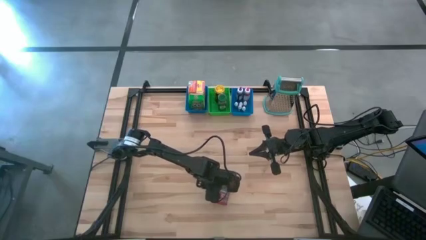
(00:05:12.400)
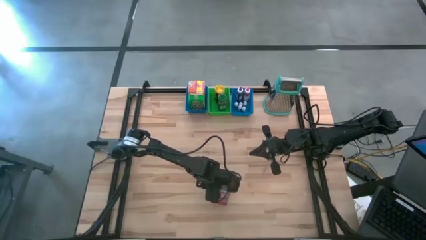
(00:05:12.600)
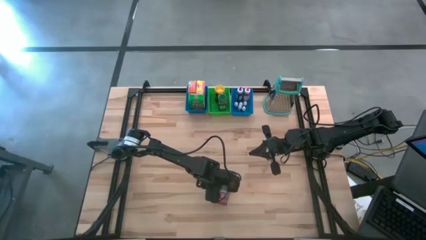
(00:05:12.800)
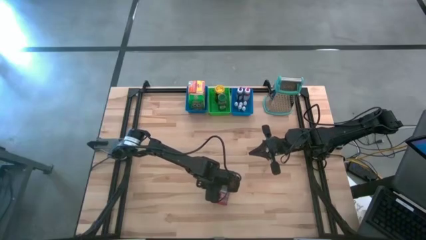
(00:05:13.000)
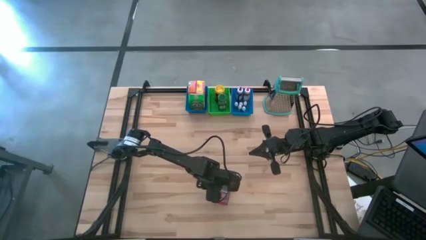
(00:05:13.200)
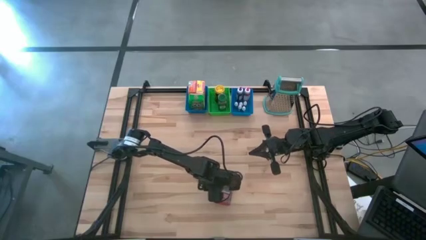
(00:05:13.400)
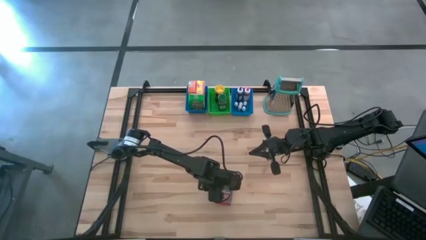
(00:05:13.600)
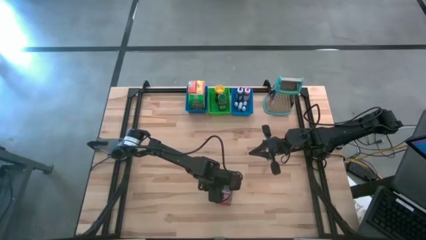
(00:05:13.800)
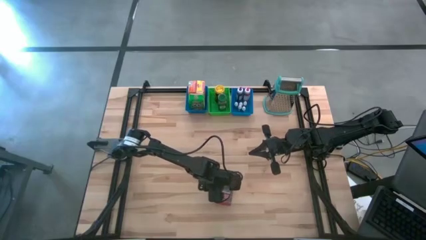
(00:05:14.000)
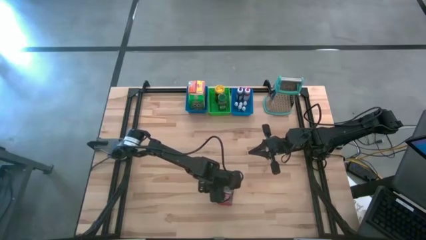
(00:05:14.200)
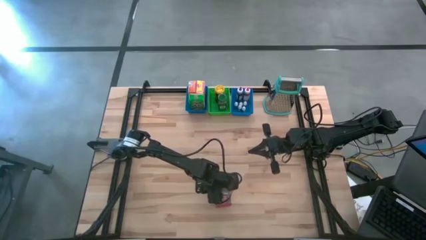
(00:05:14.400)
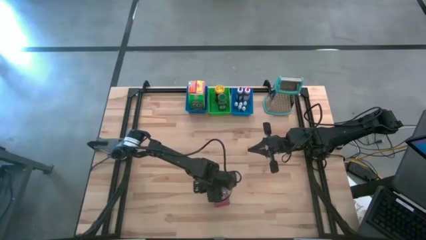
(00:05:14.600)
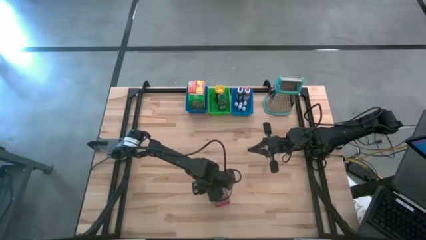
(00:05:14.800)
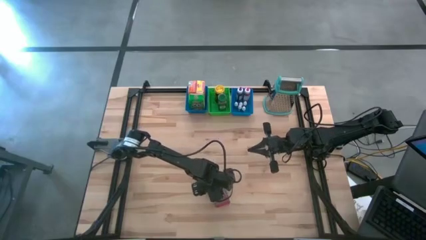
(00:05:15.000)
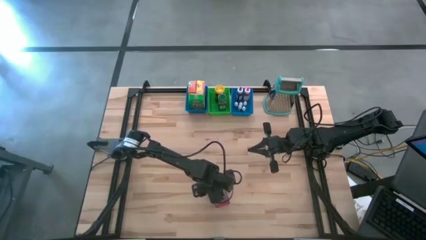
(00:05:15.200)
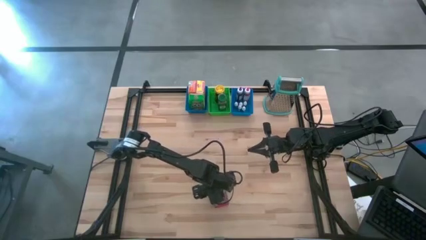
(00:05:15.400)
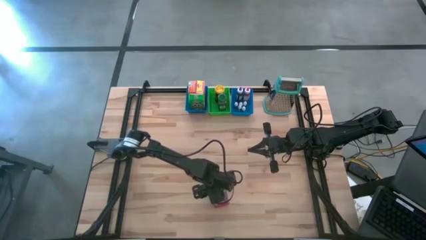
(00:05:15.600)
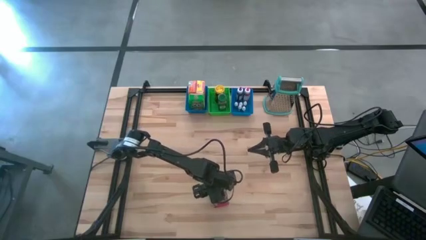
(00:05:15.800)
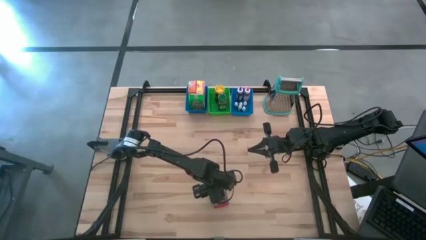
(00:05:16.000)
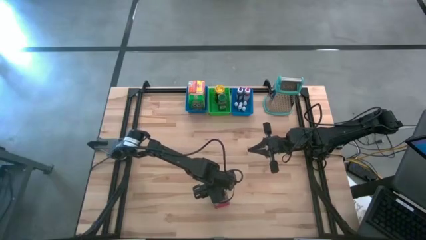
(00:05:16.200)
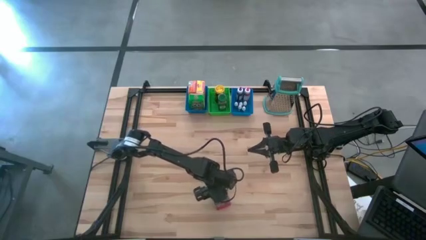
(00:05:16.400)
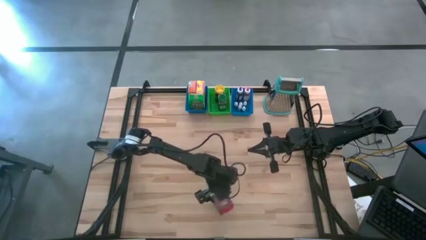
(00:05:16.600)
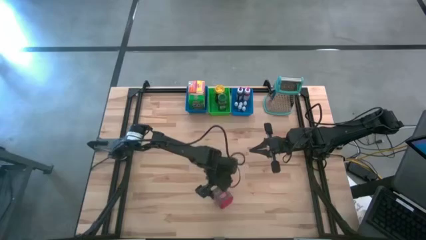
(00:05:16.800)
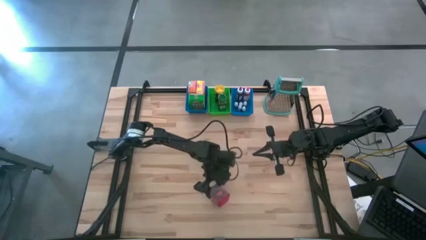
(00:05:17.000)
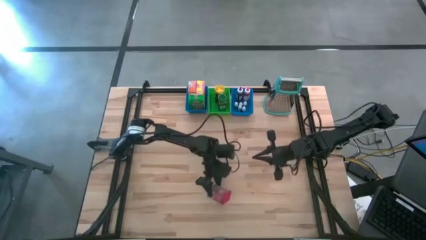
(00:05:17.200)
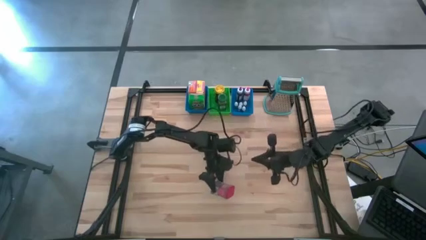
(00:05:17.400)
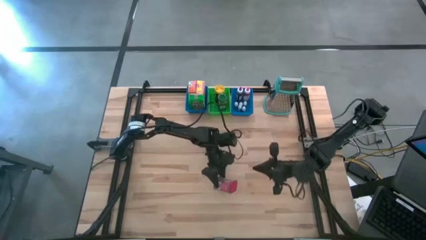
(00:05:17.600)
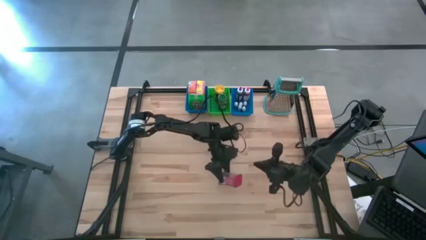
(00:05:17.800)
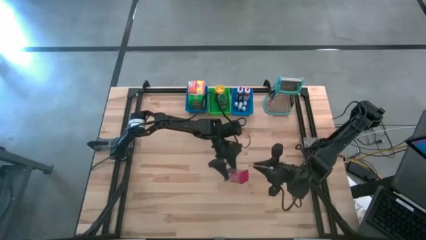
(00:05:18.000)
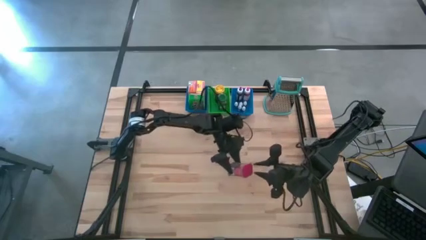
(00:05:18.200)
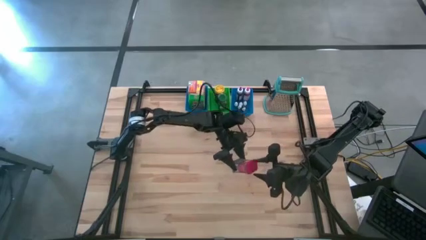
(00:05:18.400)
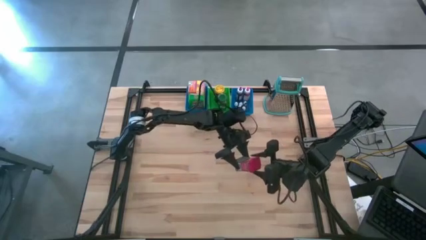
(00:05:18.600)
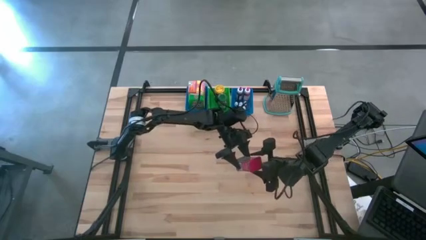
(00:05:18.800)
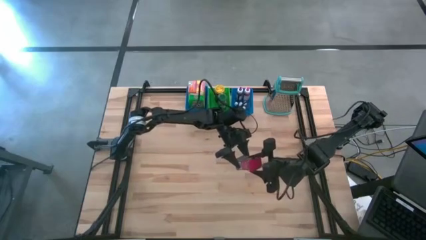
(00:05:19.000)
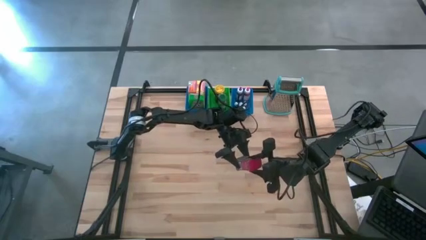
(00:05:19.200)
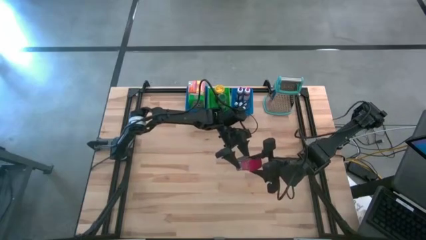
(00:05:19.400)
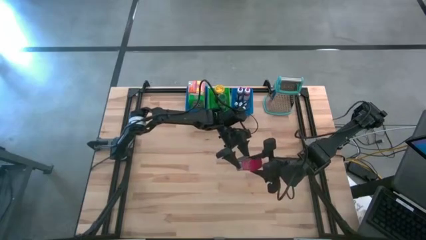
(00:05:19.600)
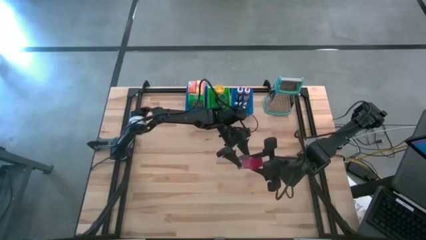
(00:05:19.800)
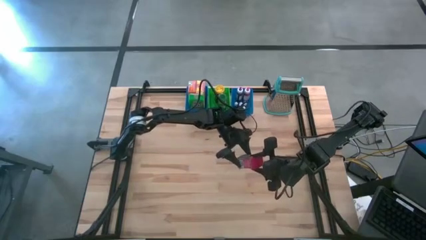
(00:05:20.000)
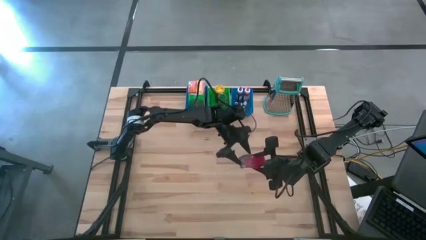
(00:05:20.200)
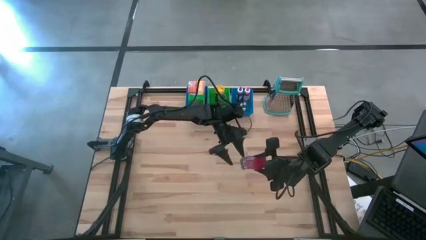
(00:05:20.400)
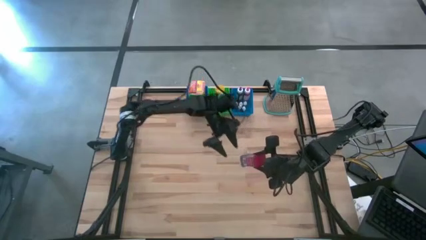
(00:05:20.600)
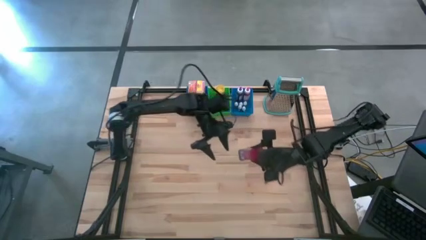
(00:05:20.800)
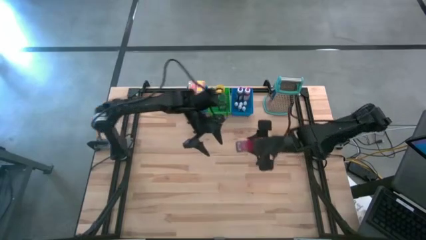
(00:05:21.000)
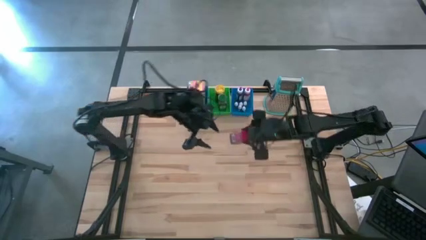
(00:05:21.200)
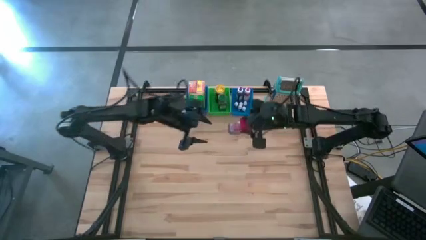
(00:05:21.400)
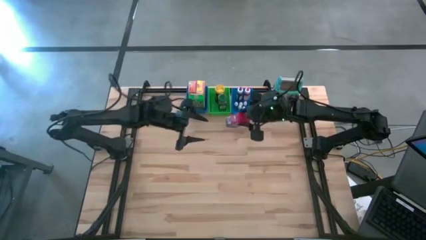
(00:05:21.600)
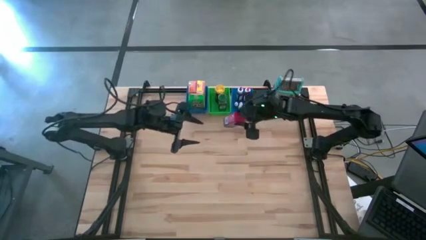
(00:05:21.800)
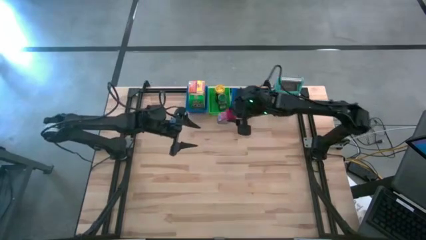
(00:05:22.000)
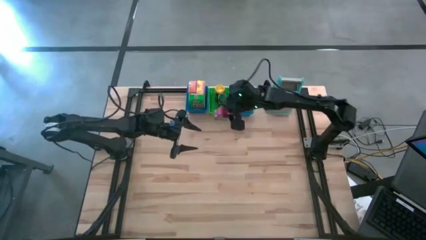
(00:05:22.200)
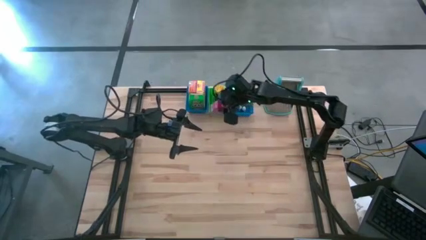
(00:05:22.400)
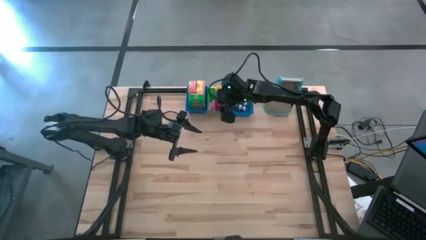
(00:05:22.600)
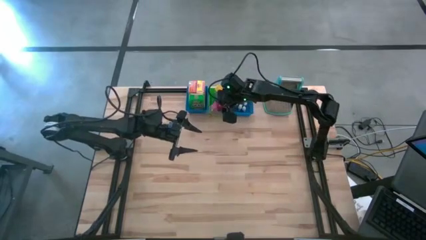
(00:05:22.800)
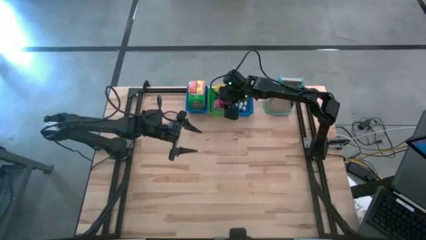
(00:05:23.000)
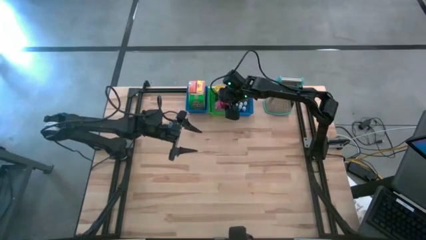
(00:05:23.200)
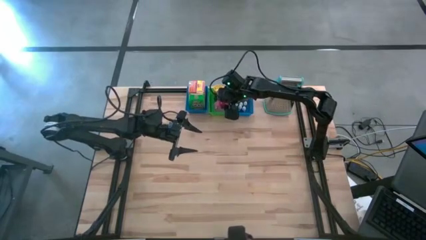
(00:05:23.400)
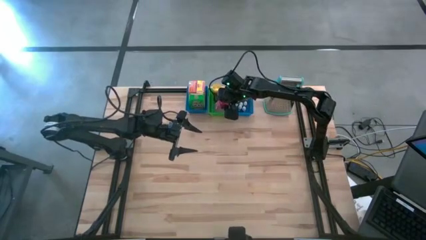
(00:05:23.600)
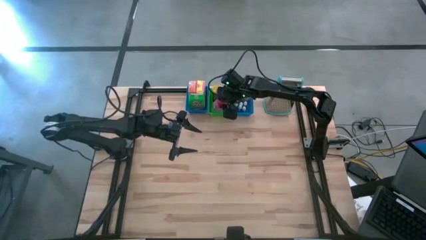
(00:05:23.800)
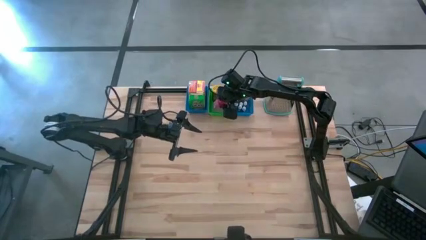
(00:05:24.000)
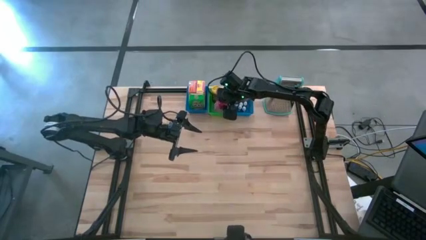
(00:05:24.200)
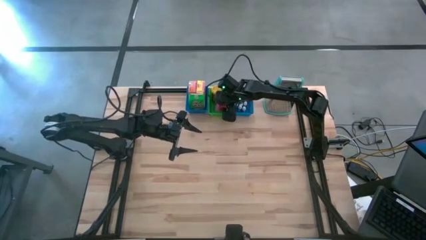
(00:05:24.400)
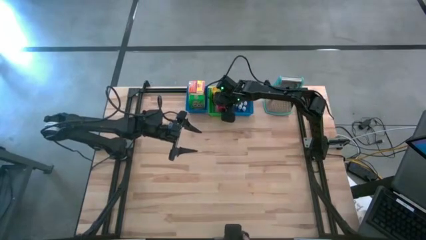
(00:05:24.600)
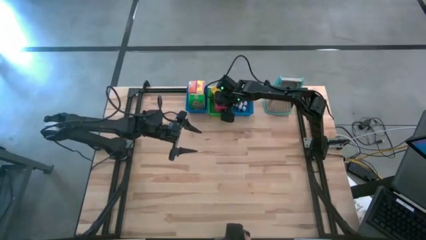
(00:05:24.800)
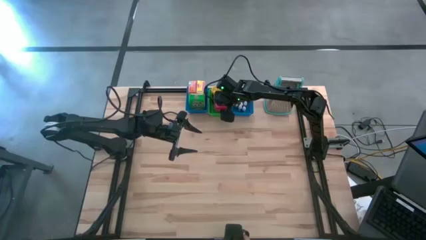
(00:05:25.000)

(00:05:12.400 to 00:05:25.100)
Task: Pick & Place Kitchen Items
Put the red seasoning can into the green bin

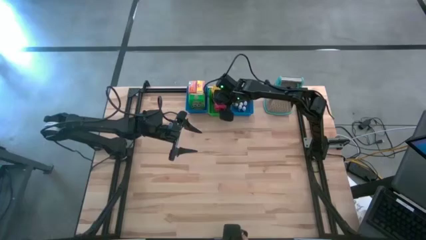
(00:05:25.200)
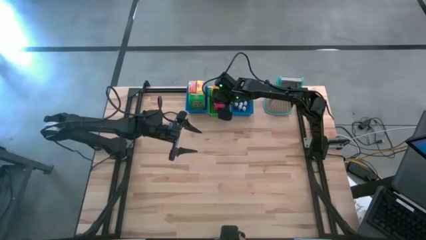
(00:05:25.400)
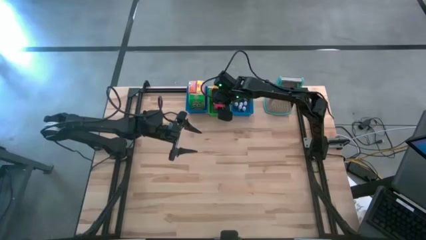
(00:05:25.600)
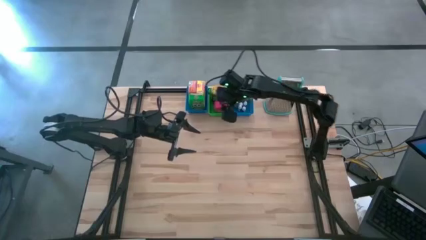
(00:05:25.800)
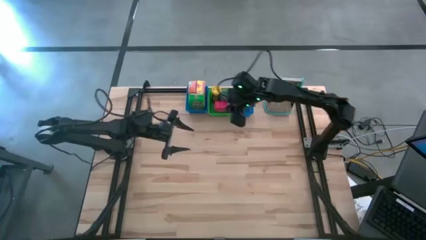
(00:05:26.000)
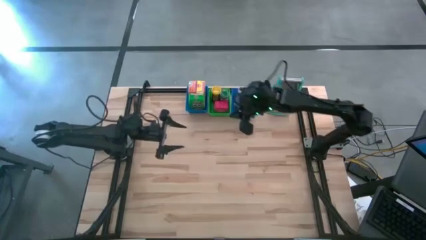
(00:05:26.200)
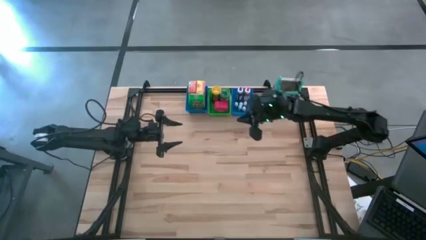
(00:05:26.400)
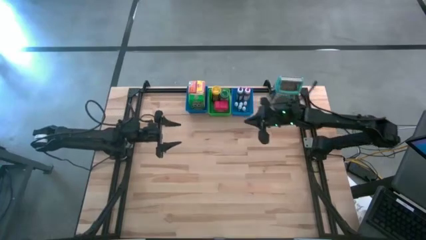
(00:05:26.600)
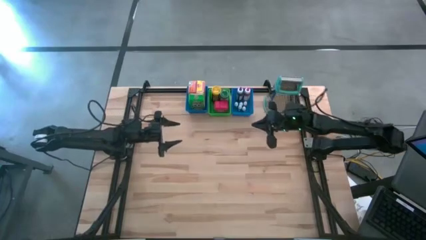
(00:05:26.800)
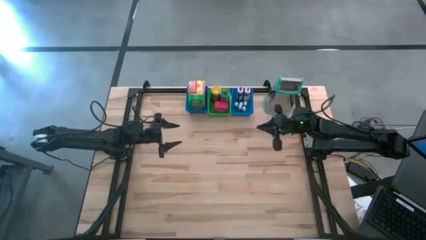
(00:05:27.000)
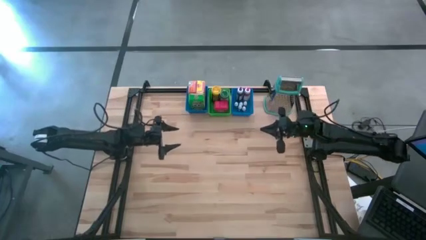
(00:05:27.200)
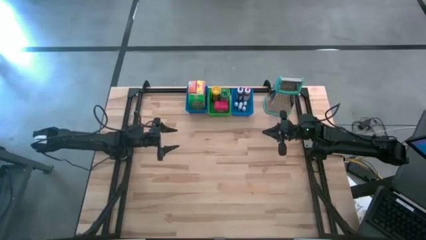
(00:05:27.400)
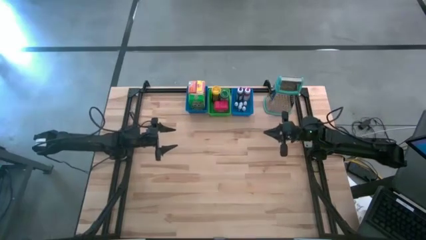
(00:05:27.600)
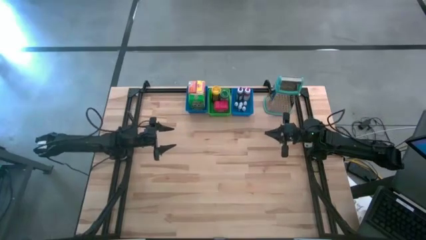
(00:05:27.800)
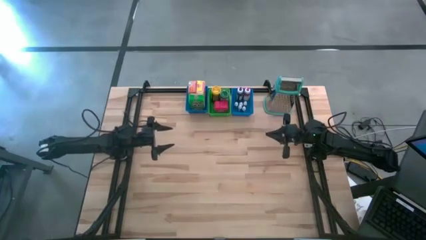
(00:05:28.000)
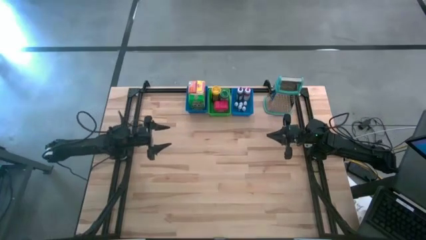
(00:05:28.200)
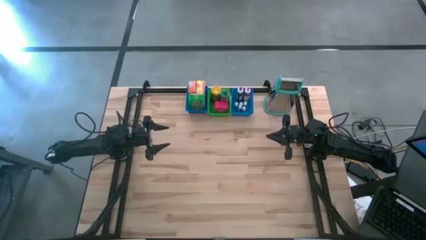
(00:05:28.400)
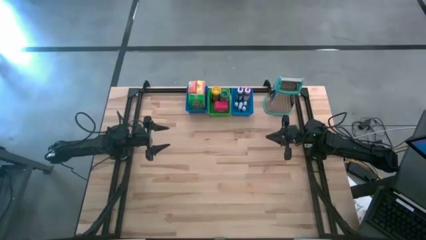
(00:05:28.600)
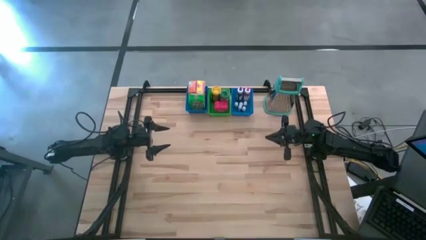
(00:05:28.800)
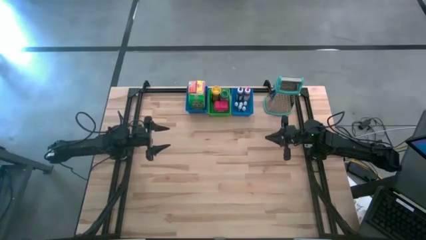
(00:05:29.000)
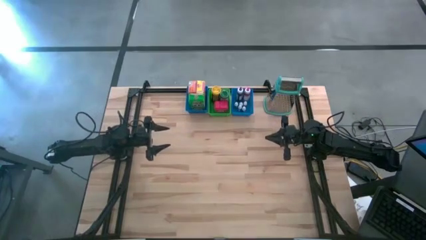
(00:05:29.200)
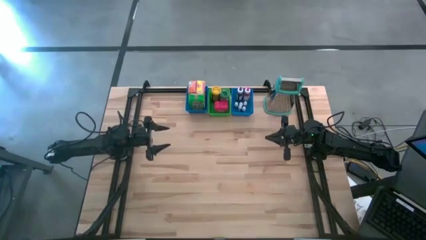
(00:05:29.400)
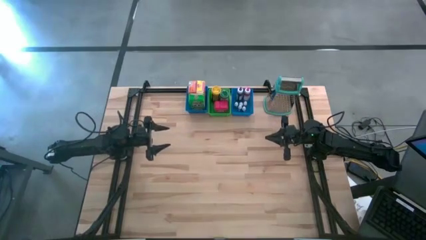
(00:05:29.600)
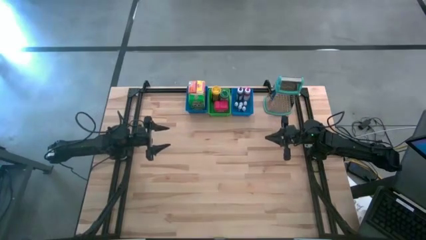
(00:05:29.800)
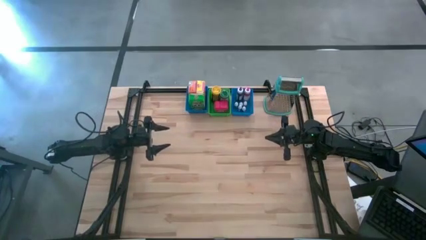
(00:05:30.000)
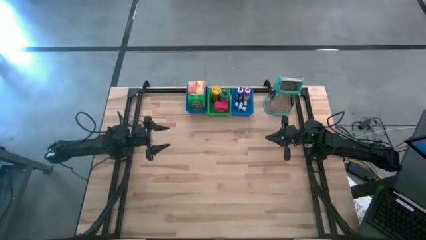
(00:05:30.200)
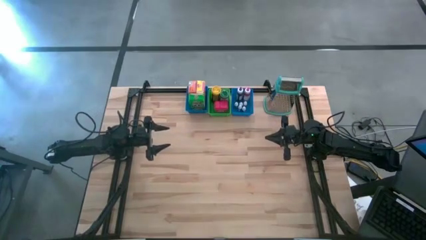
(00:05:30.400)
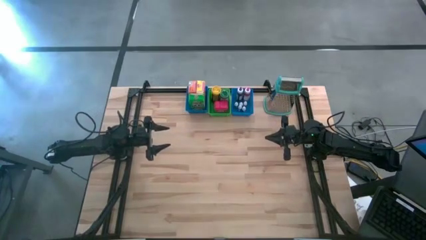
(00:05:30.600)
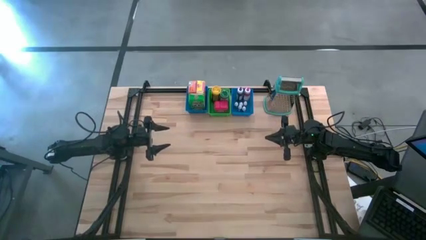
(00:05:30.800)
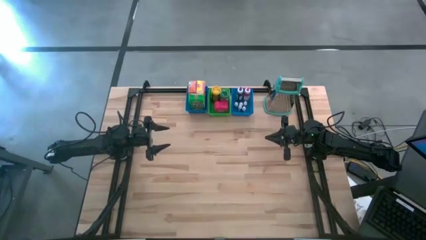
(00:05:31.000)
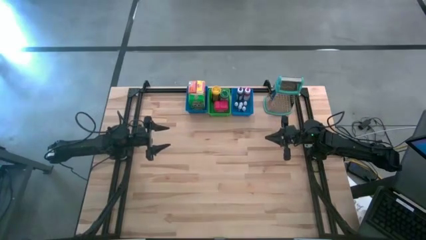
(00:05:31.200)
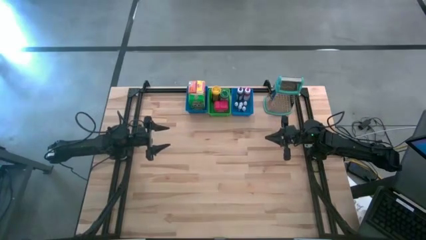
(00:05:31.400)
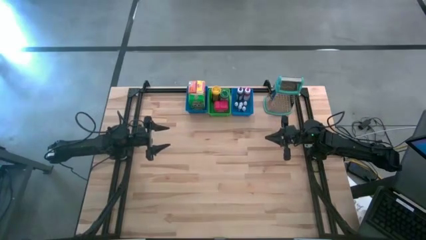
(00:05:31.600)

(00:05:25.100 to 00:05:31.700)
Return to Home Position
